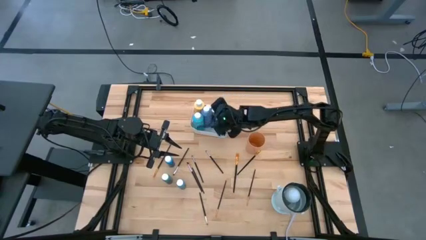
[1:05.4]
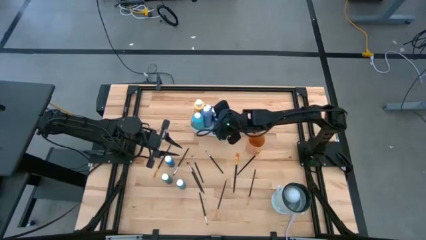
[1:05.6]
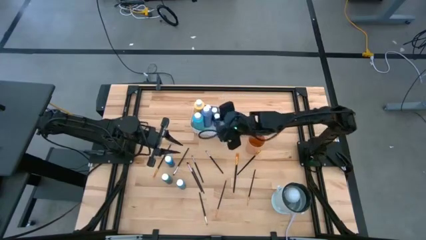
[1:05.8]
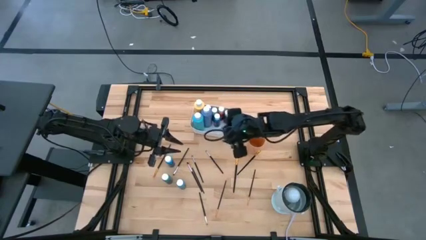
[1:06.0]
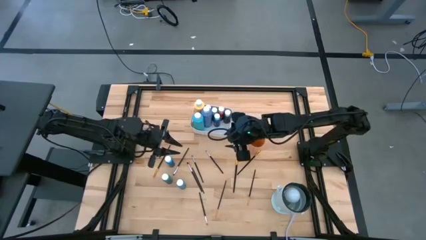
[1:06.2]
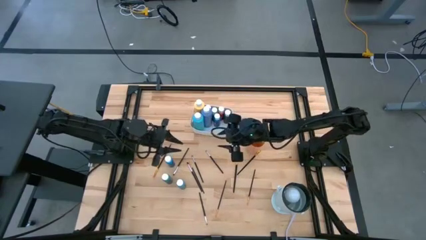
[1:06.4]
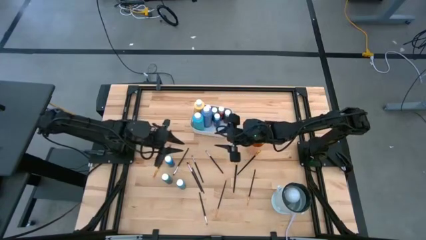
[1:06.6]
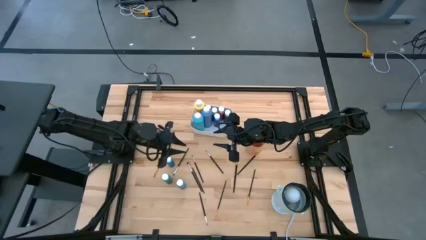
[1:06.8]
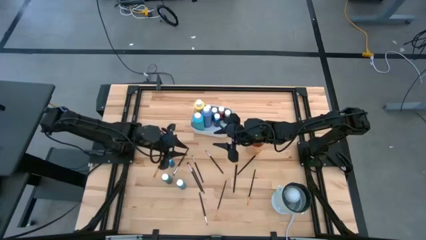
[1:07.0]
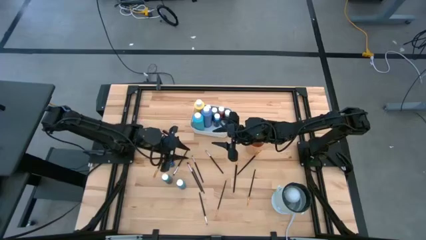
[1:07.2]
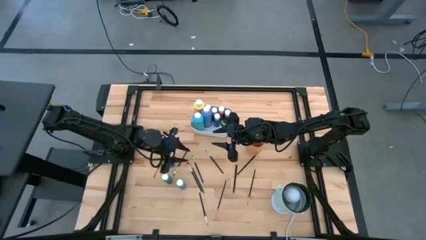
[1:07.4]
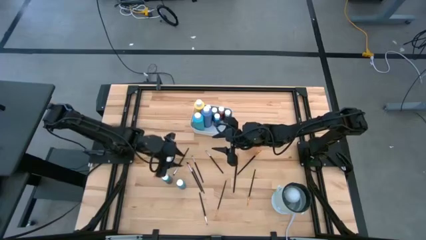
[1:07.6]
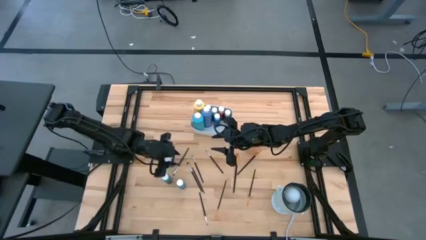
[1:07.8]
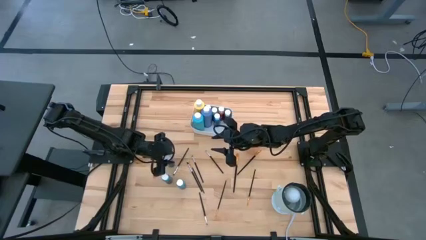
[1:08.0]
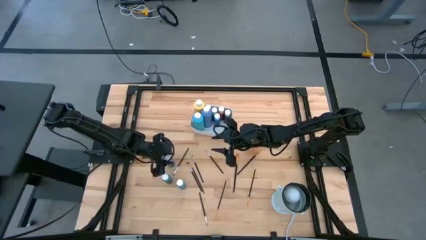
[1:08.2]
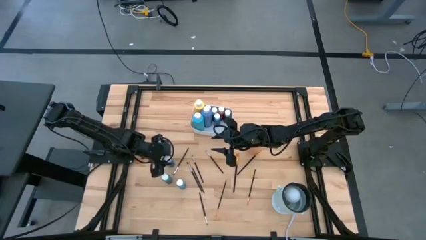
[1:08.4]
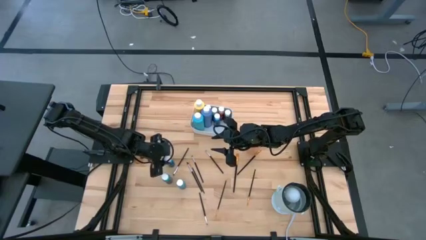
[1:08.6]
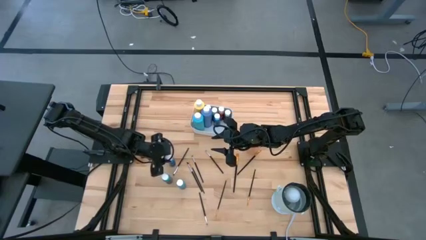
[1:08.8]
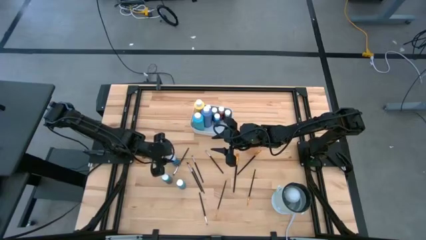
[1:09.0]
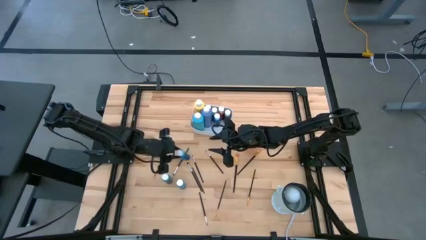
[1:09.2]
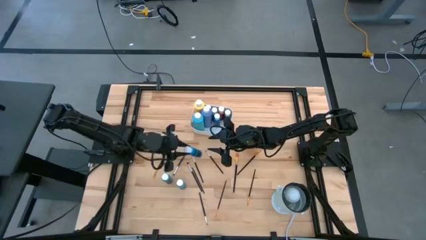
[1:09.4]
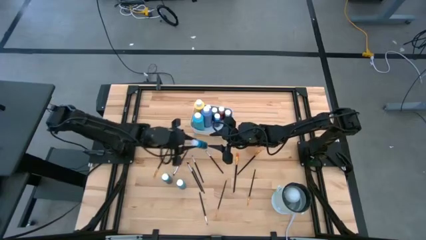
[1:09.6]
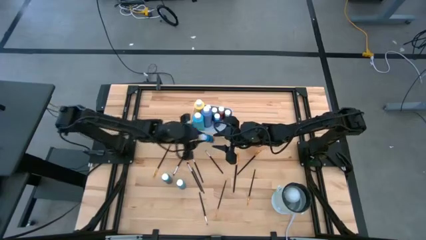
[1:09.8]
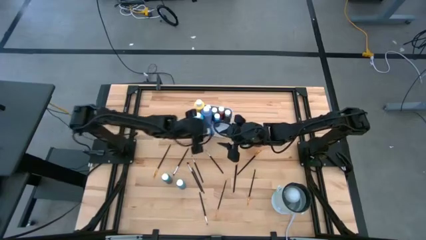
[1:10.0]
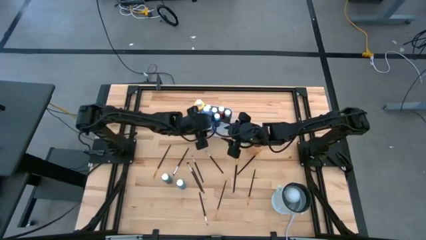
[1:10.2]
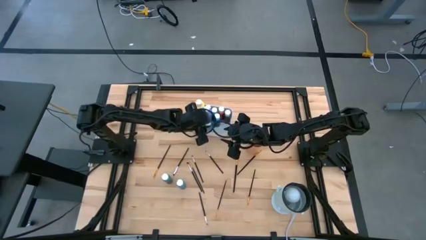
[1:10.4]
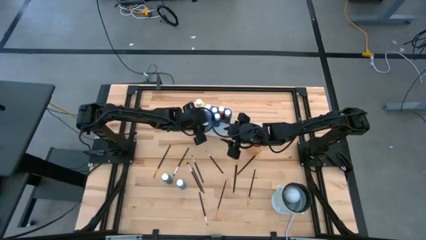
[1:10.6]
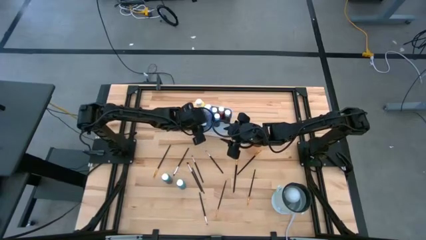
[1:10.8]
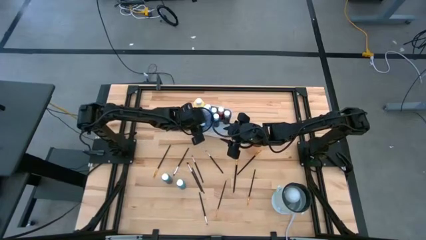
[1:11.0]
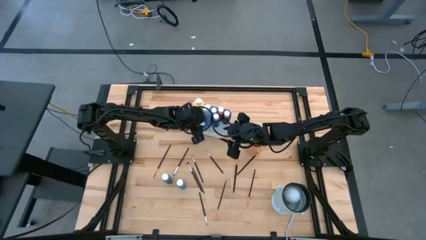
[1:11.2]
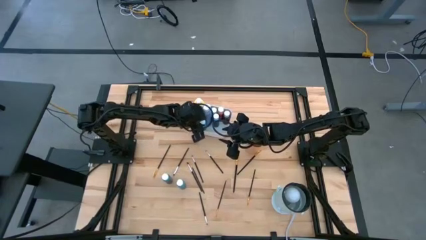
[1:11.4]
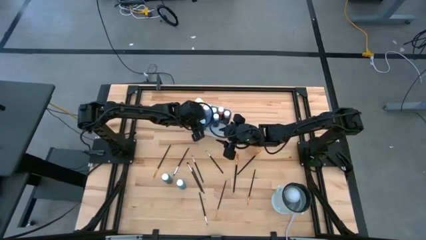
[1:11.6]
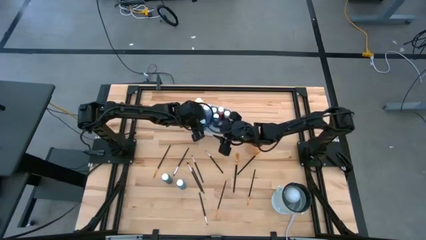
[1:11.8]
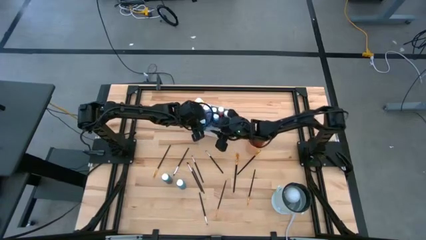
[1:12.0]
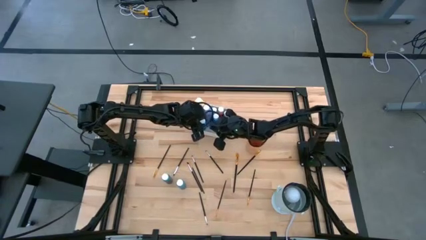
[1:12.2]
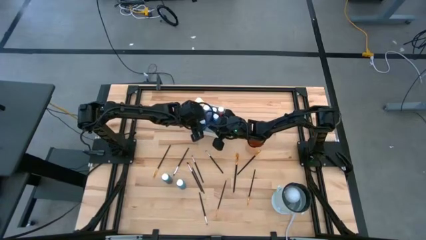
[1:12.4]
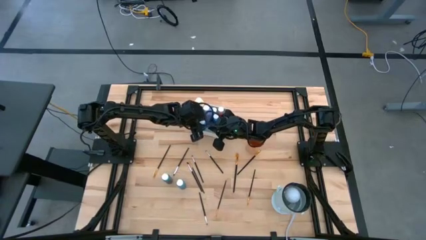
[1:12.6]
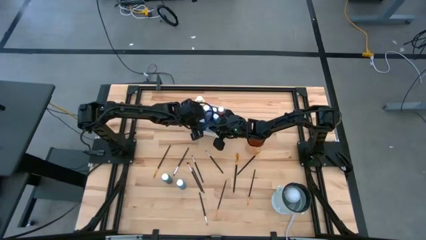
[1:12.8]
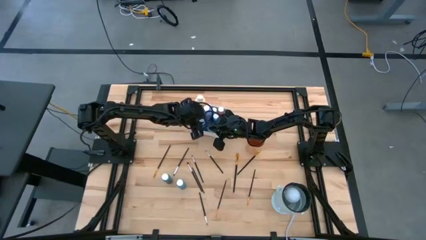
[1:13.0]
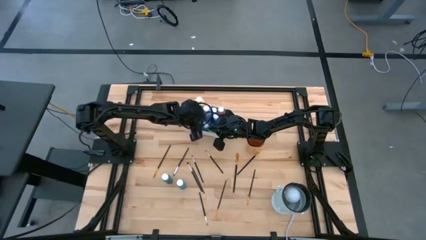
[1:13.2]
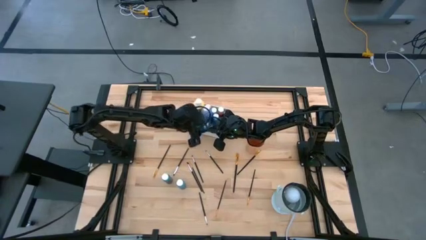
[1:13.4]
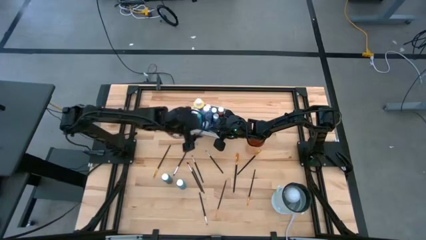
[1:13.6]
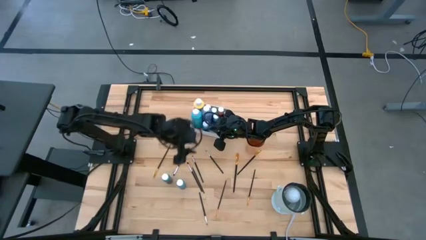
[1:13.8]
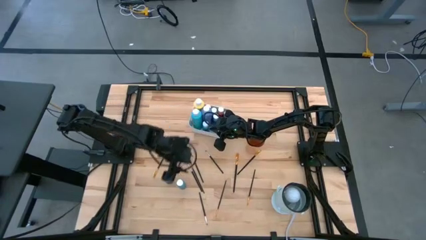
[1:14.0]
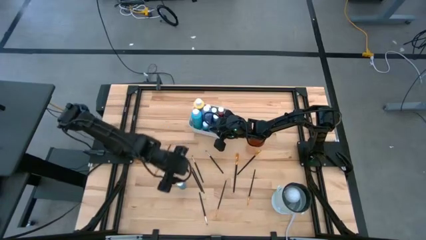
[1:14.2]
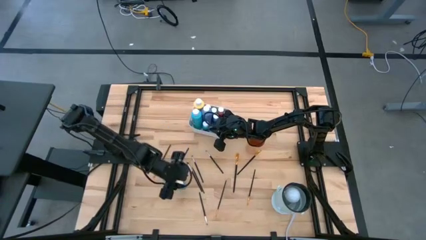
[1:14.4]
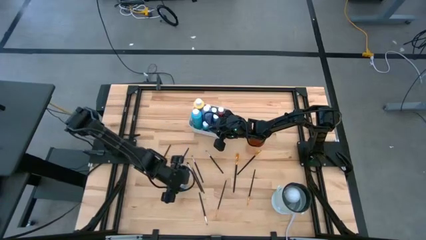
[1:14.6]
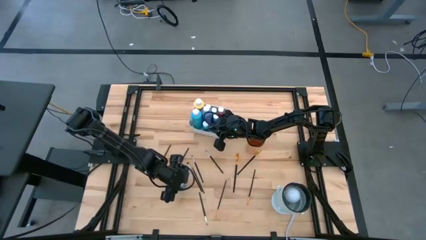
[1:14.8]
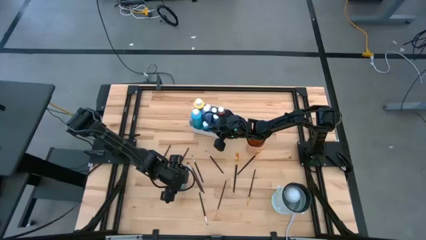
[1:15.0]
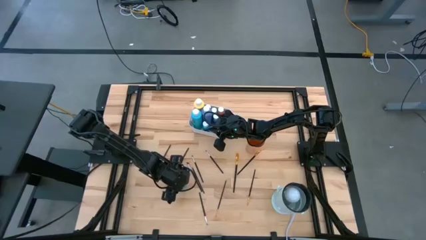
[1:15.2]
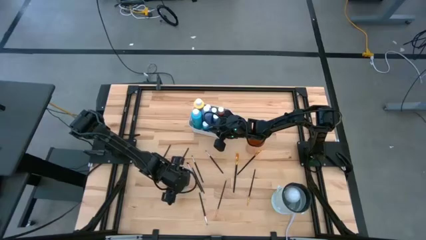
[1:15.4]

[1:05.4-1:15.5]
Task: Pick & Place Paint Supplies
Put the small light blue paint bottle into the bin

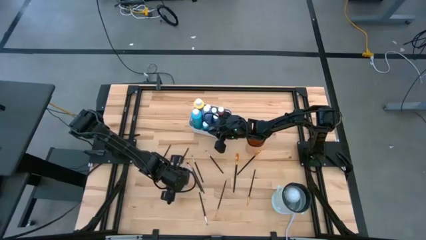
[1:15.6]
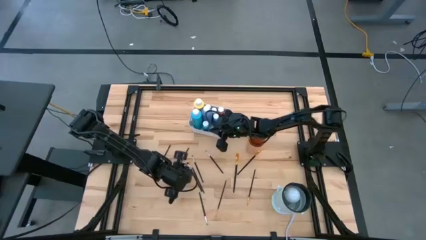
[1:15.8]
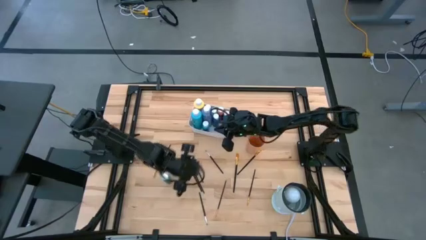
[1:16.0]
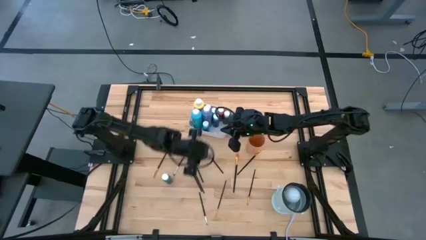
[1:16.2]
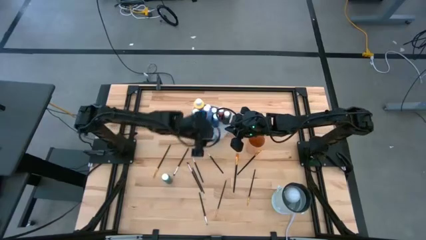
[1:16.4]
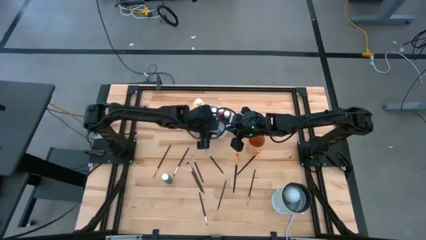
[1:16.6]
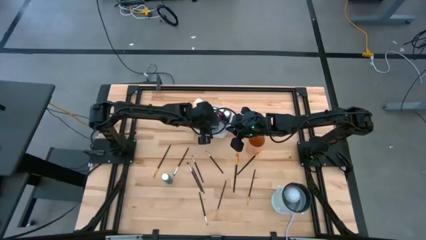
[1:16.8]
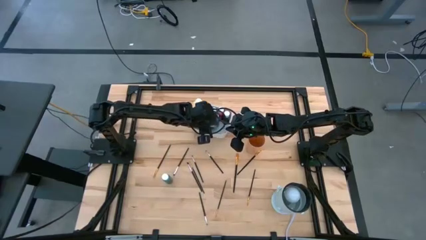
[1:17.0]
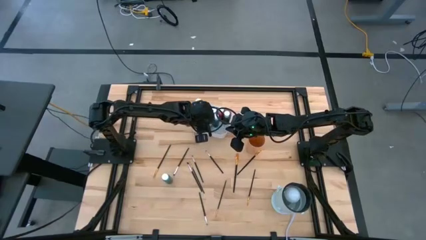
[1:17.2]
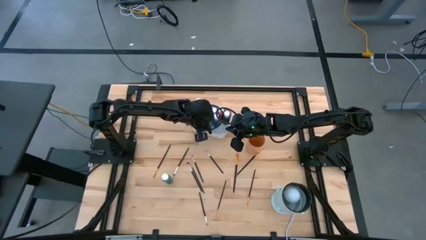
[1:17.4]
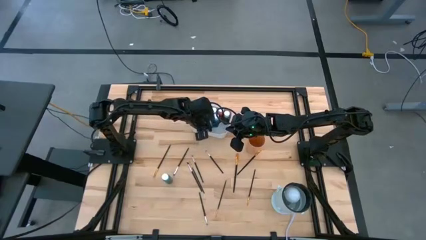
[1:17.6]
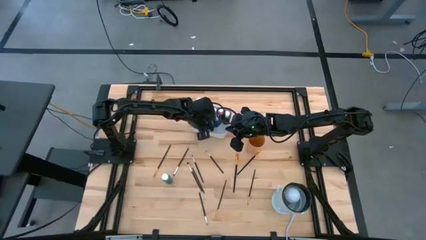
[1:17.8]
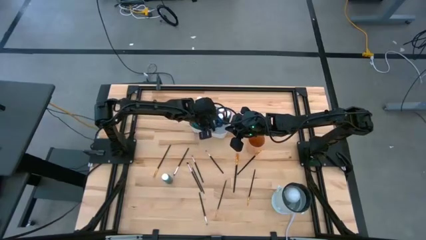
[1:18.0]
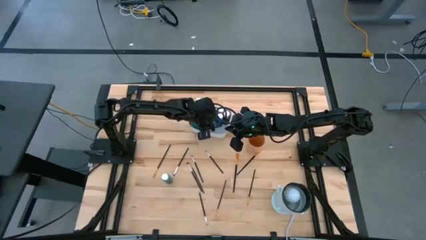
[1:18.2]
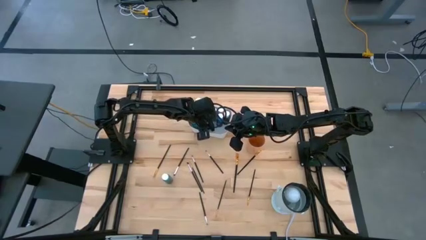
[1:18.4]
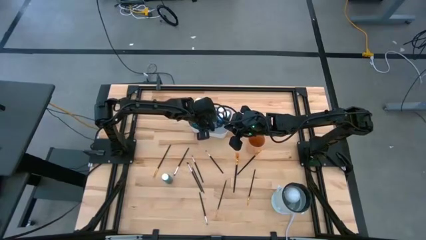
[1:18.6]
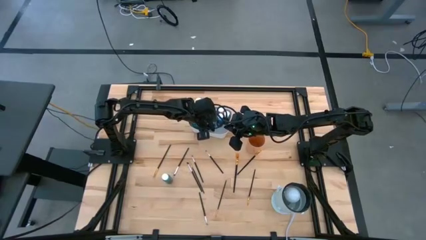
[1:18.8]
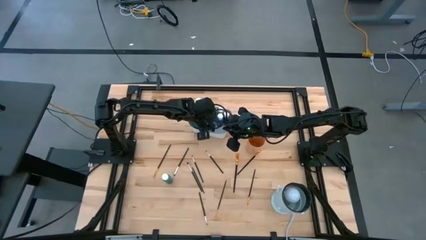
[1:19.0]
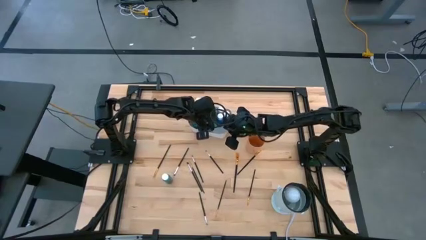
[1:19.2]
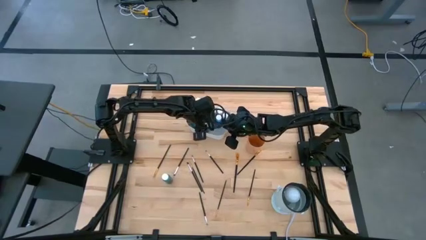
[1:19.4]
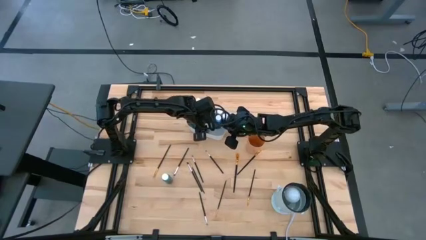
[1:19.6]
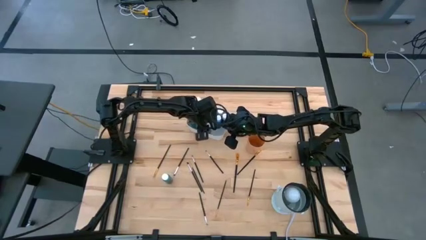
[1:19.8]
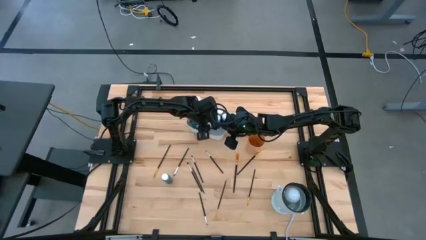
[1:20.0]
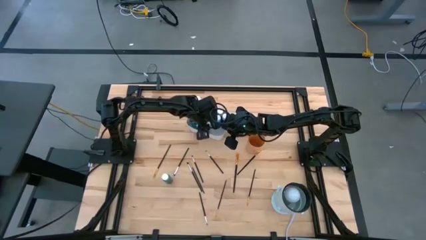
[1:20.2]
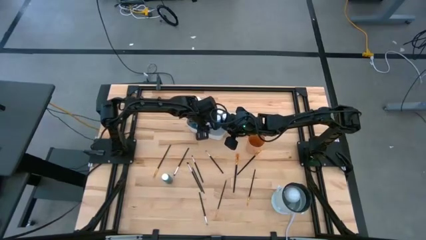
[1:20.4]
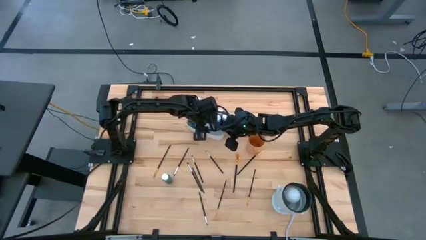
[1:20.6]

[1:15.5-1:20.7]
Put the small light blue paint bottle into the bin
